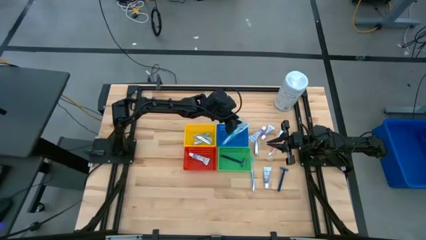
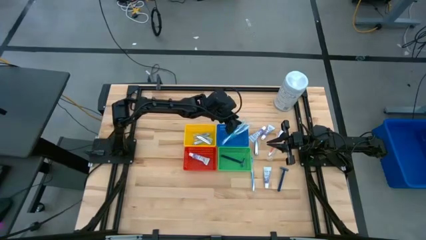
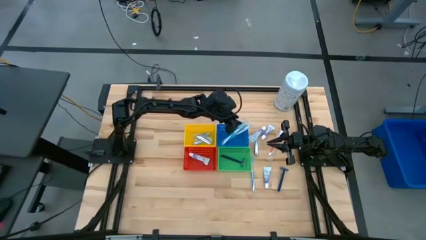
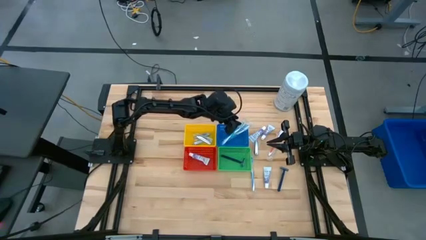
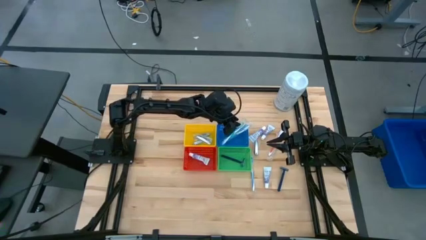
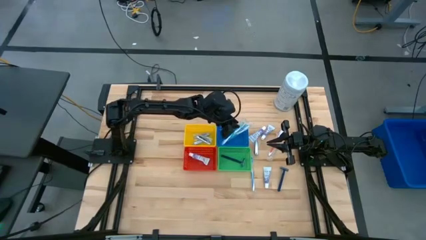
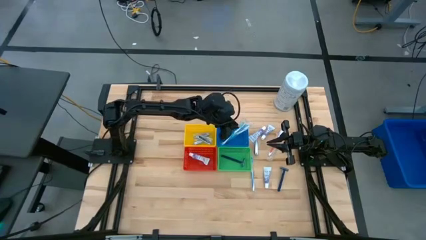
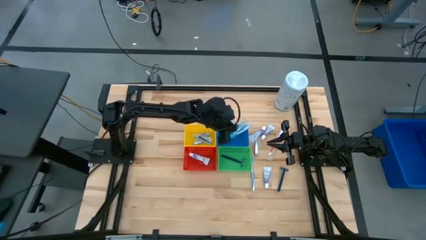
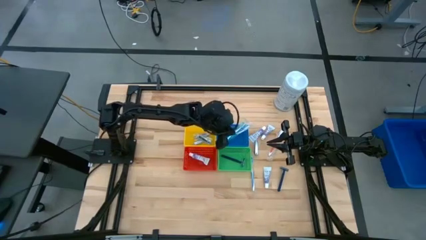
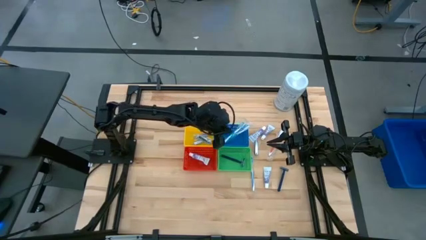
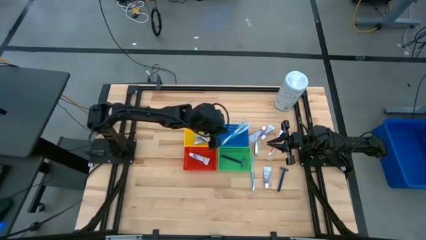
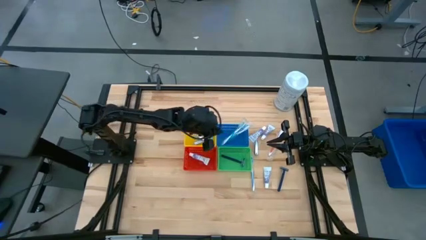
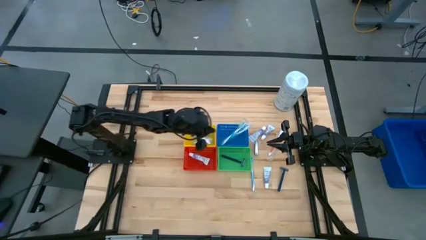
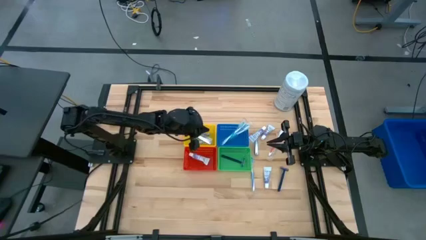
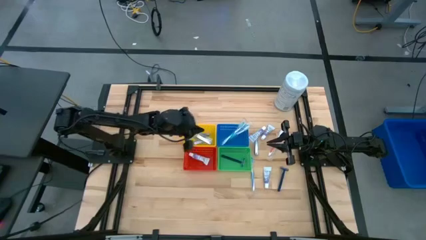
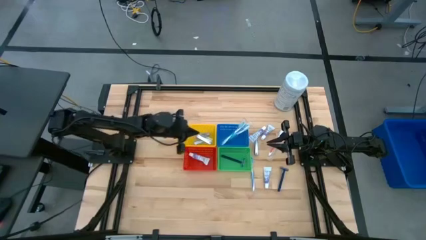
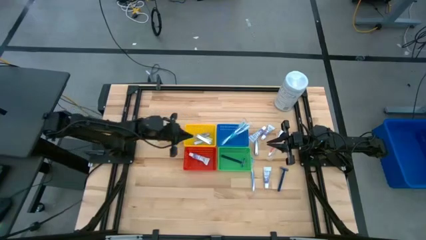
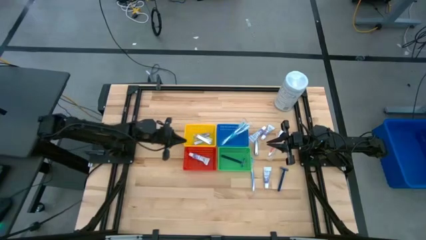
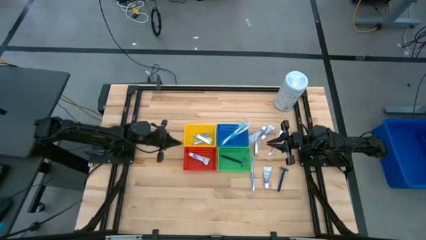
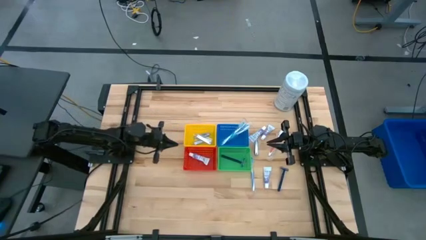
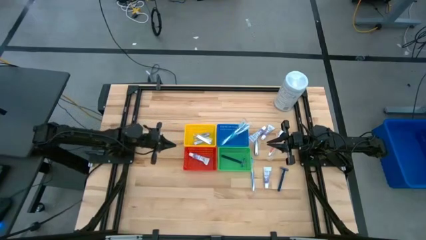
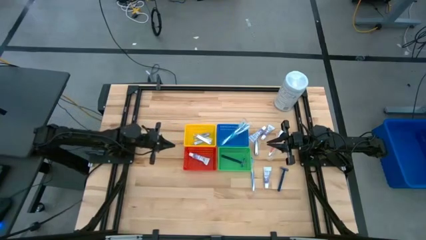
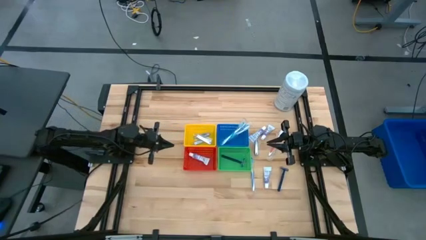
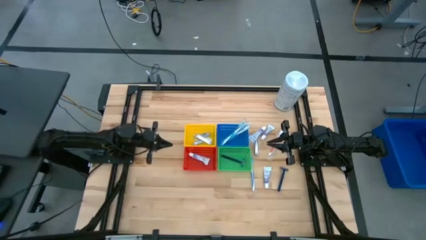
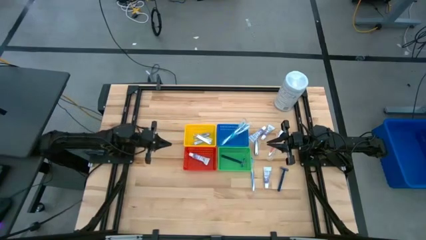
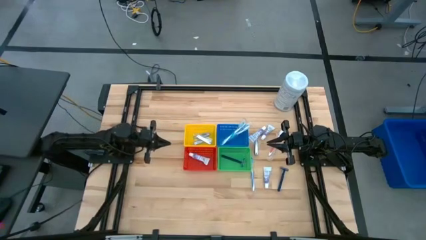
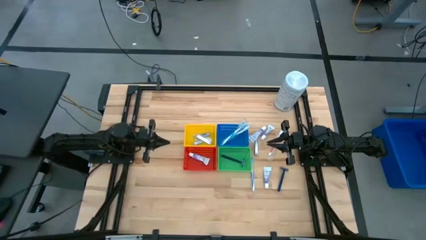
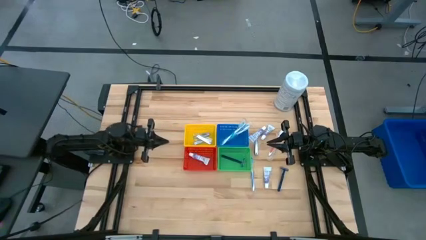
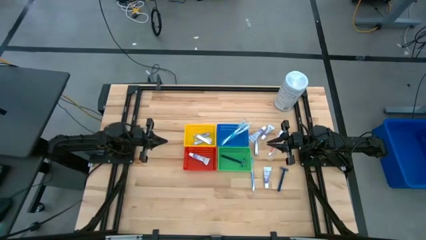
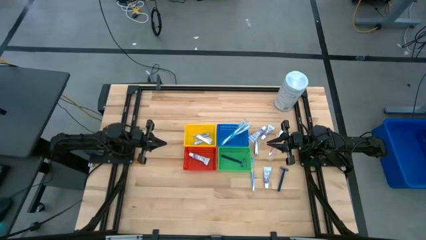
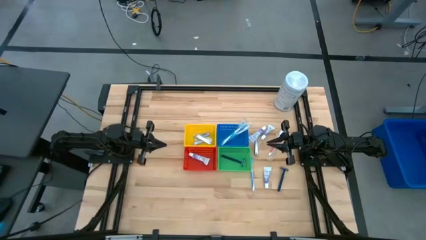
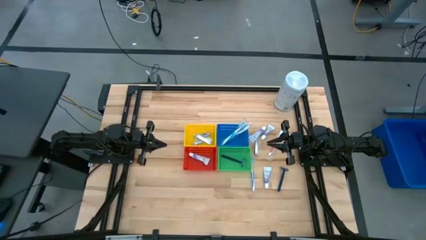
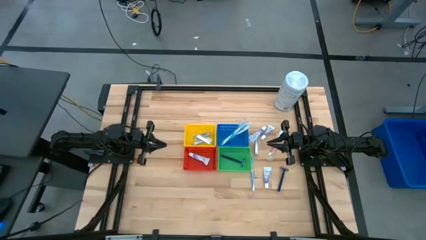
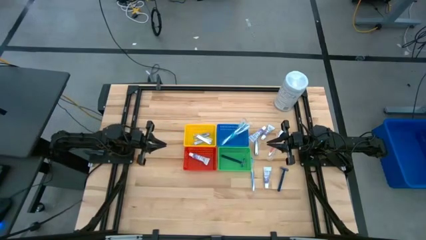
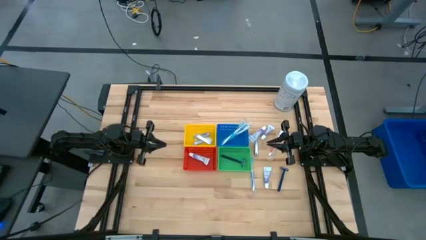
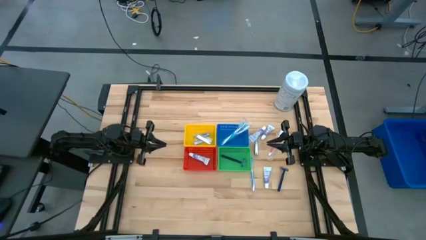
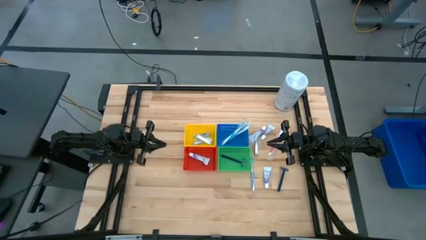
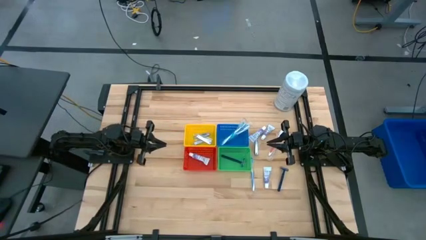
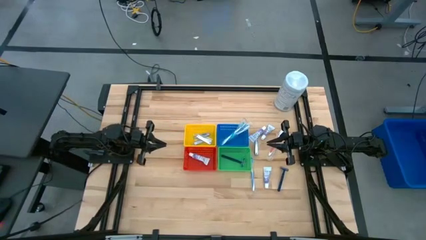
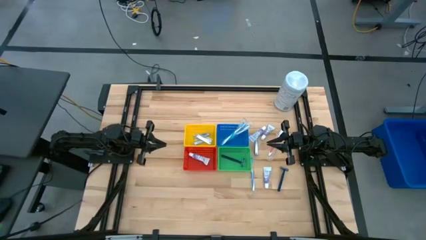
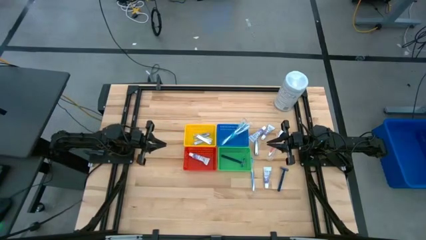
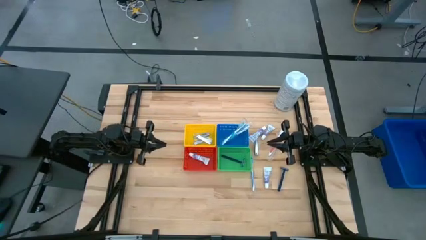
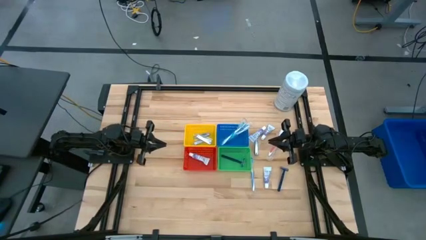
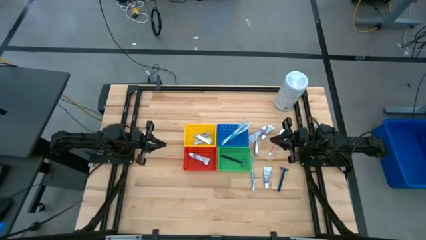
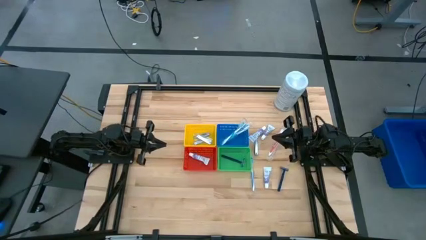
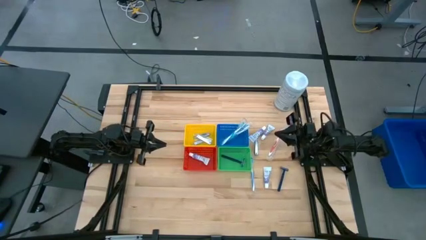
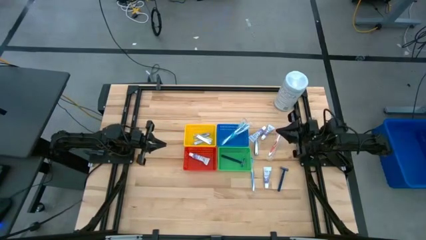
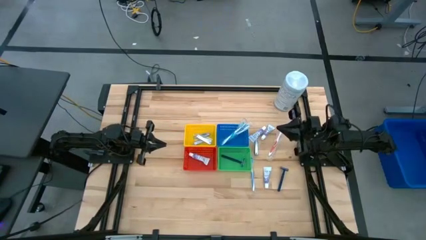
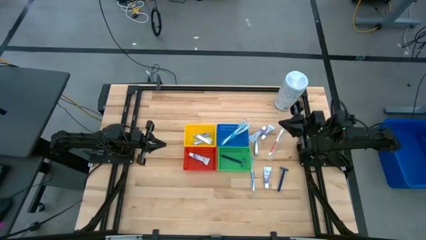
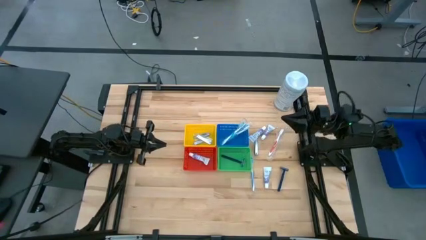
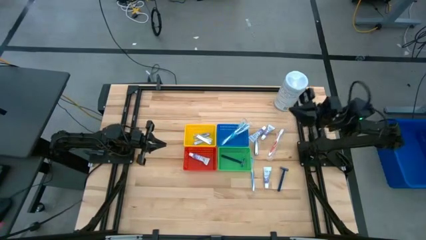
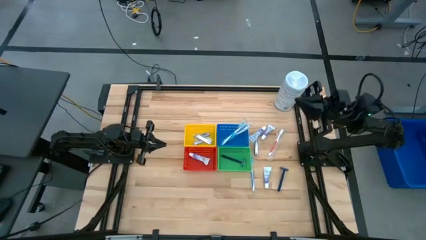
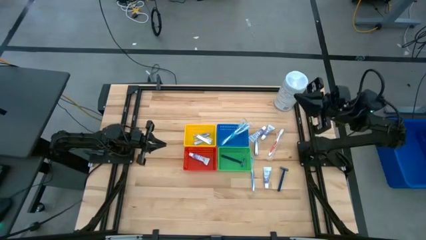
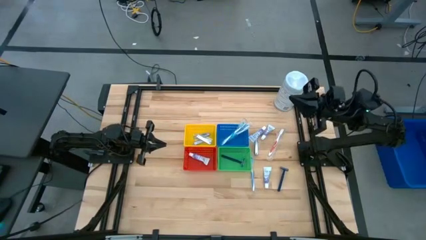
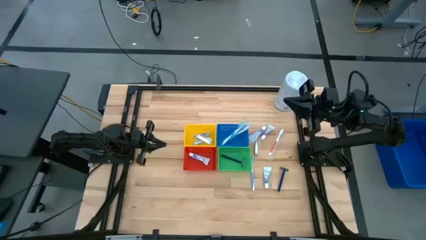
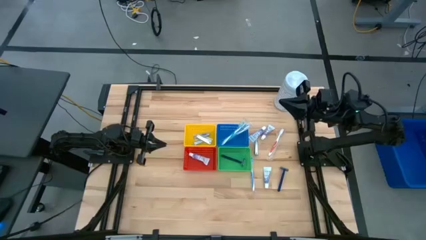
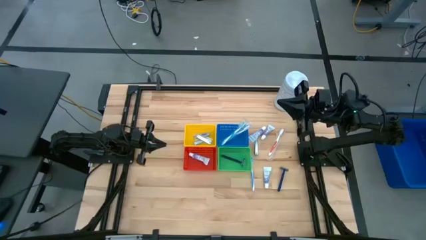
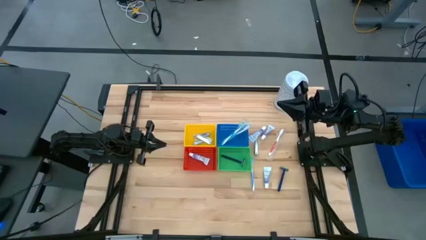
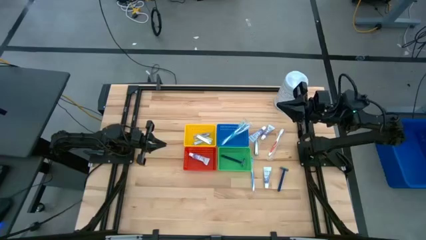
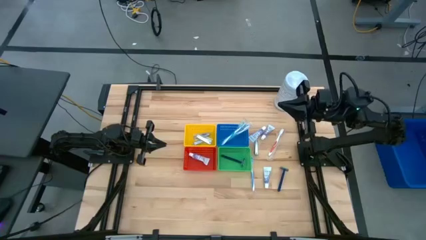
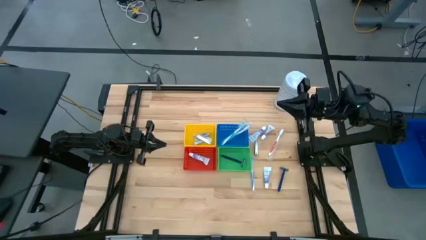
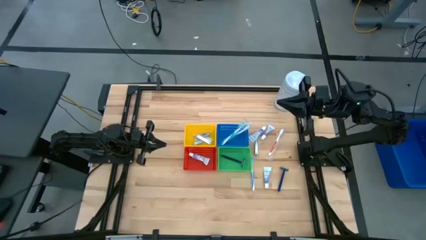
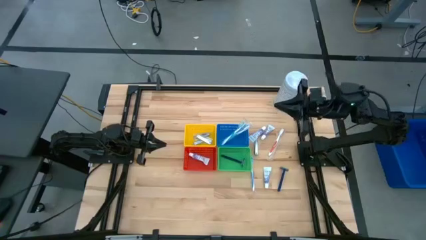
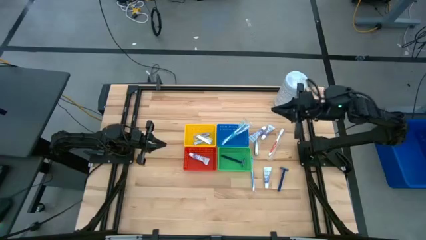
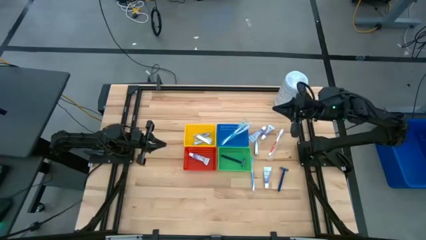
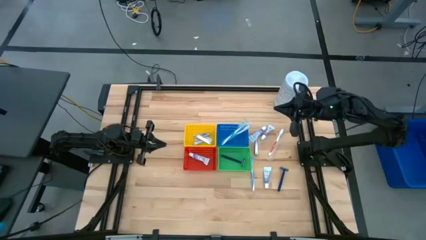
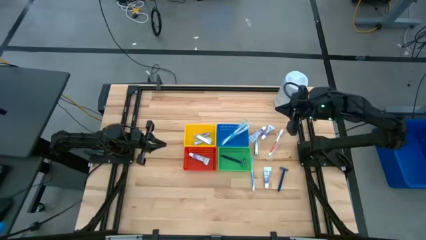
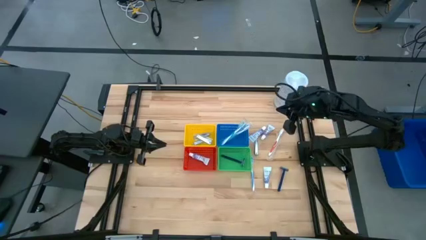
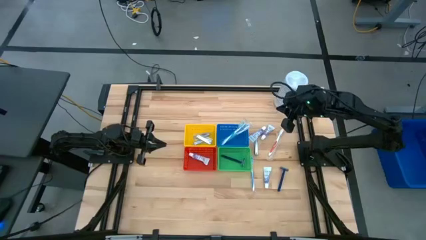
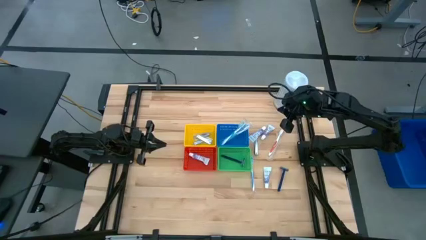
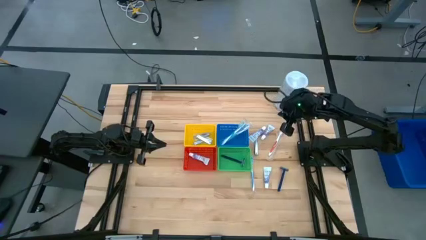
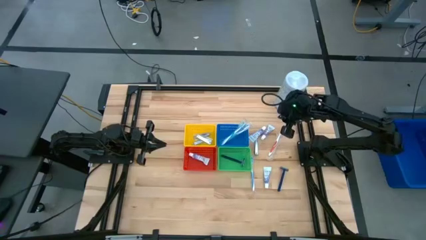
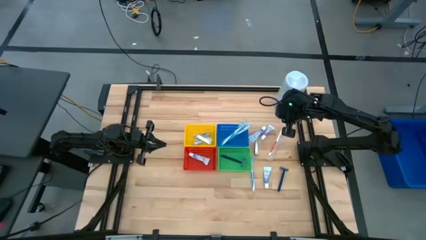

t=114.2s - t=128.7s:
Task: Pick & Place Travel size toiletries
Put the top right toothpaste into the red bin

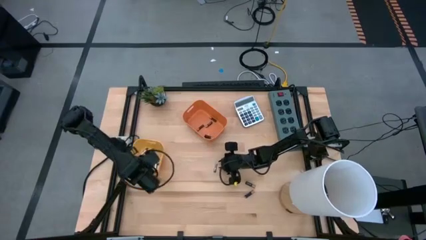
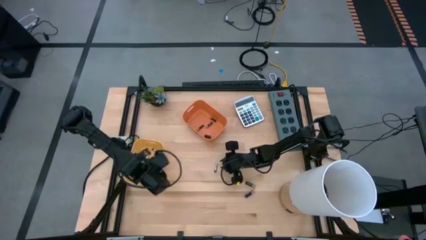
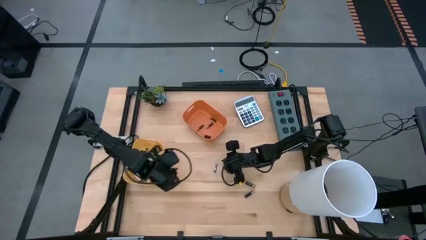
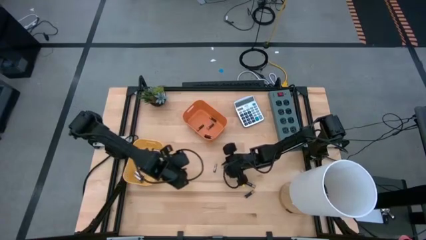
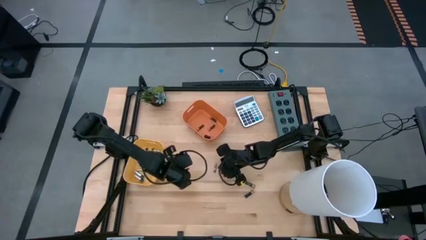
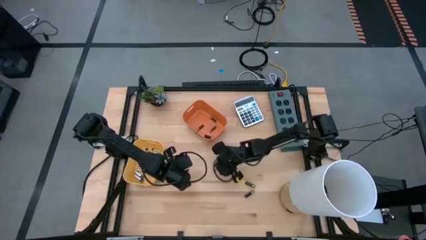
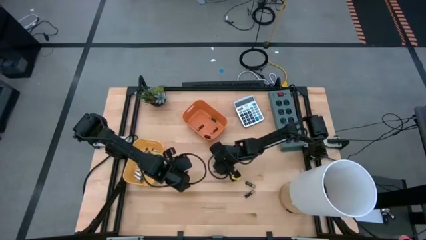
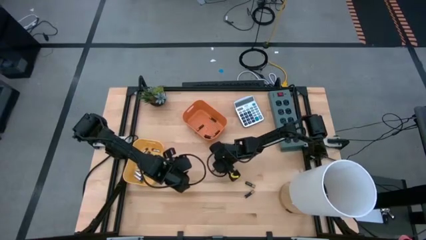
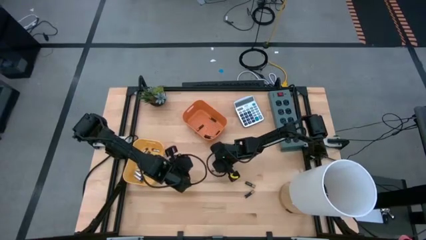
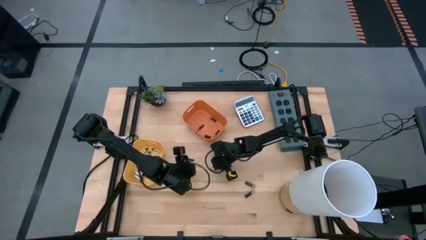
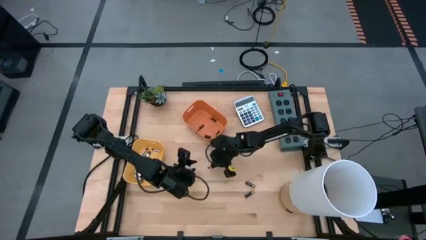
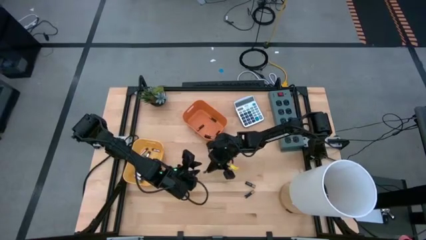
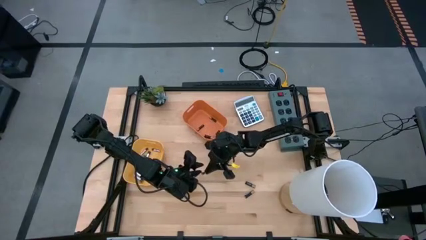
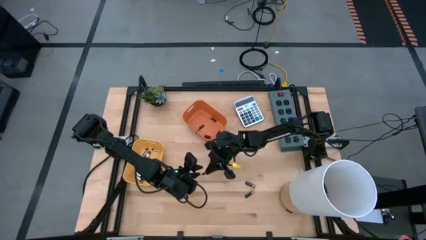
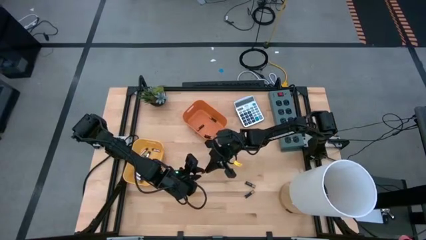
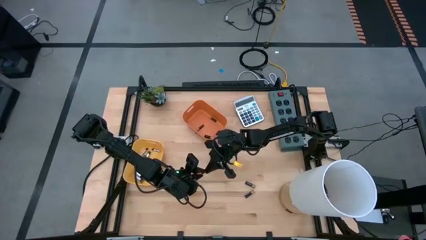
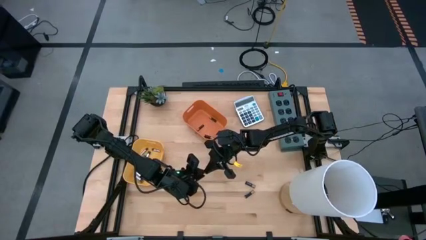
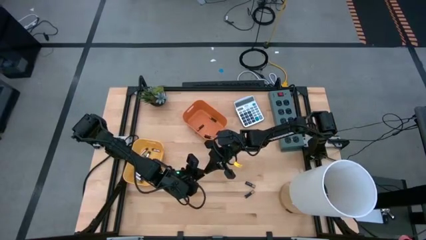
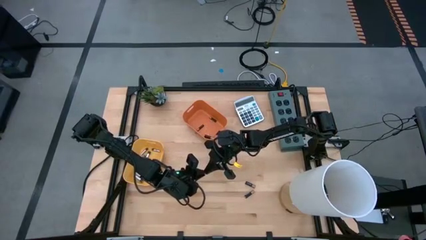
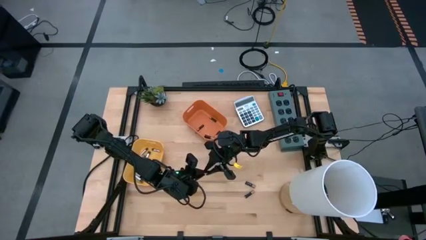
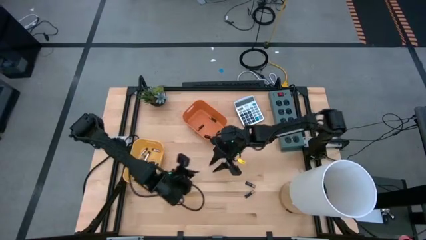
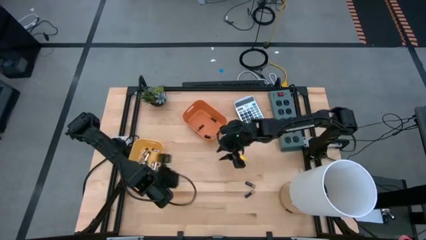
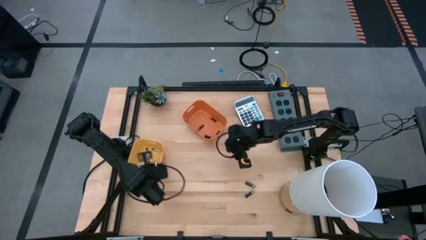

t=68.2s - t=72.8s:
Task: Sort batteries
Put the silver battery into the yellow bin
